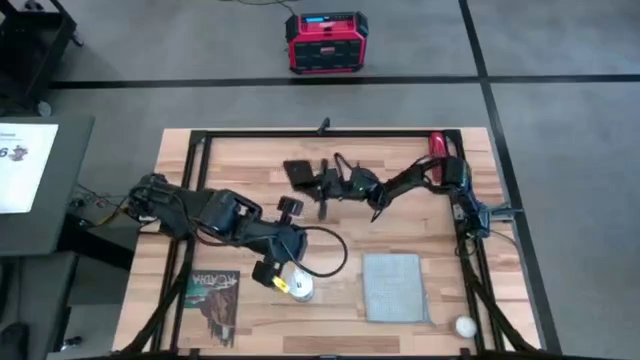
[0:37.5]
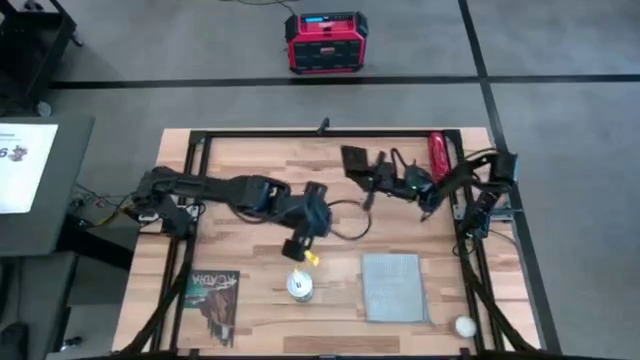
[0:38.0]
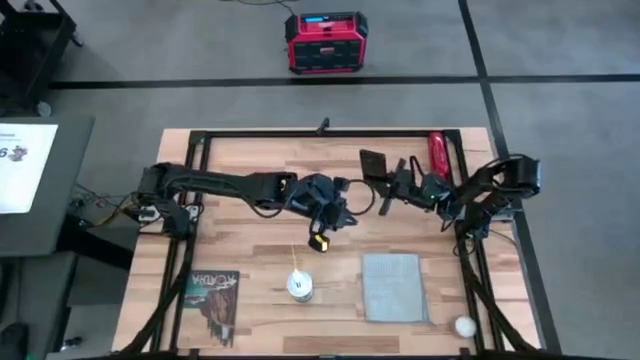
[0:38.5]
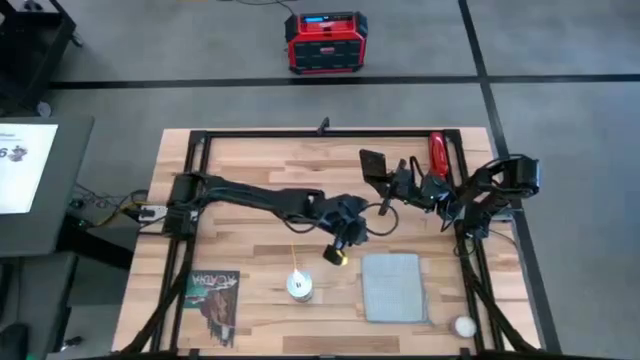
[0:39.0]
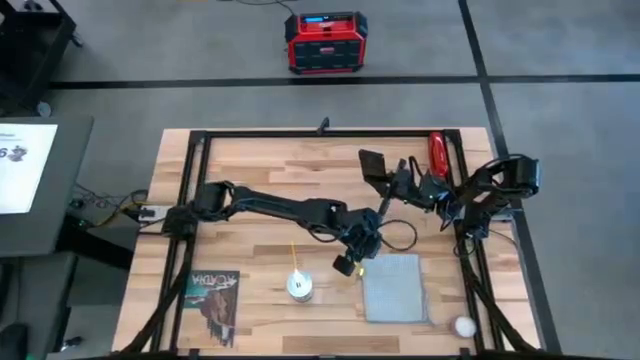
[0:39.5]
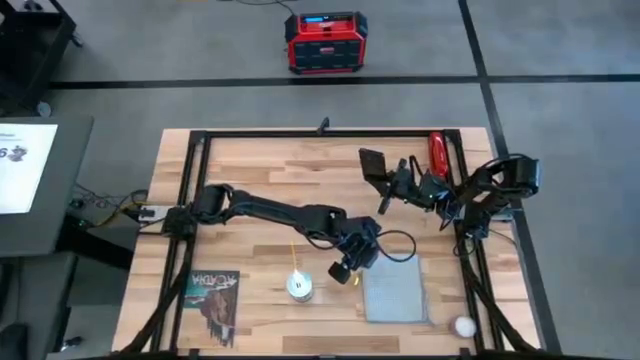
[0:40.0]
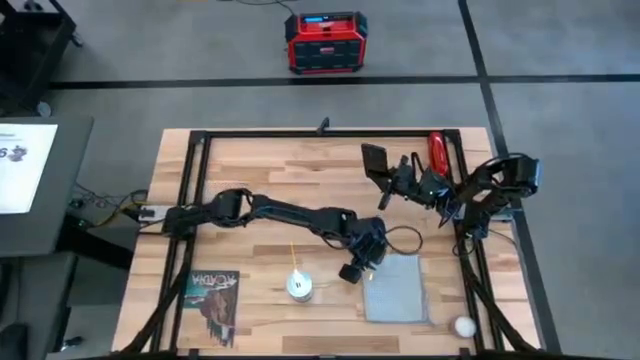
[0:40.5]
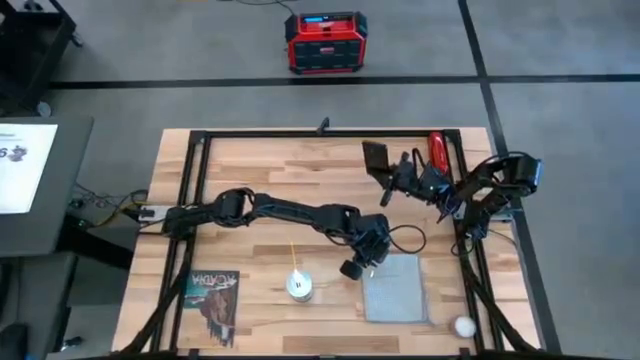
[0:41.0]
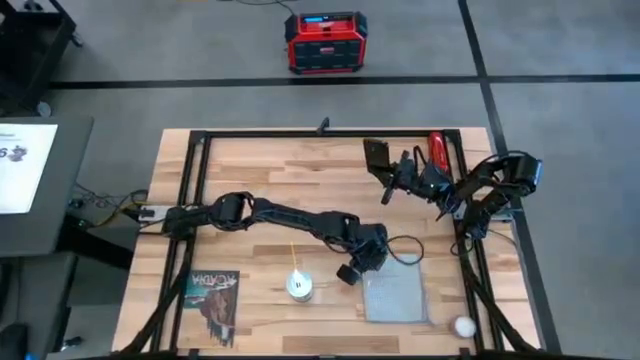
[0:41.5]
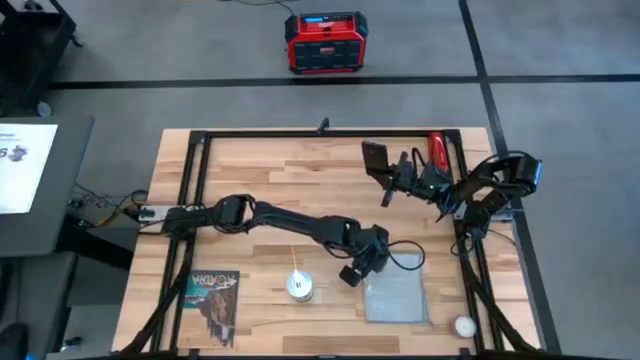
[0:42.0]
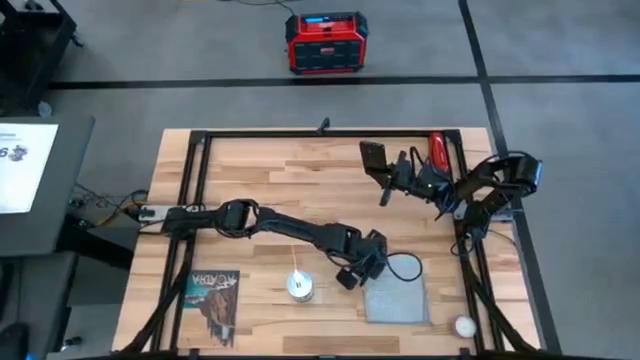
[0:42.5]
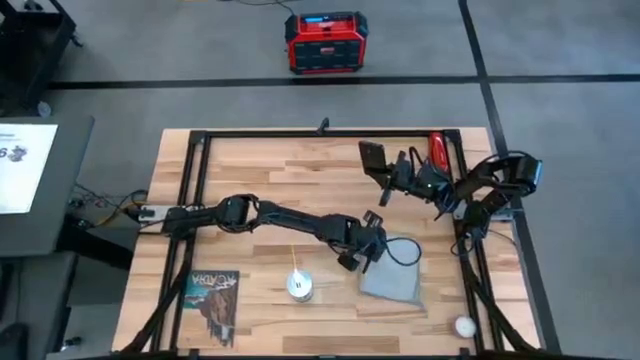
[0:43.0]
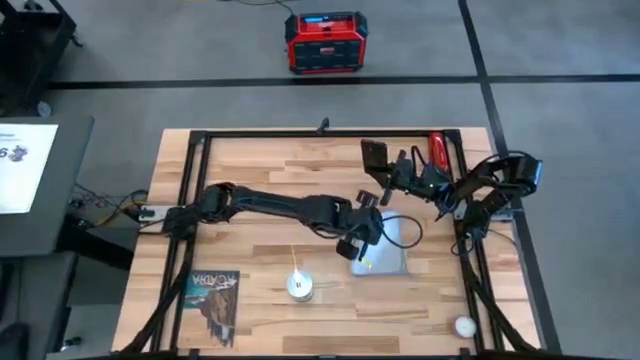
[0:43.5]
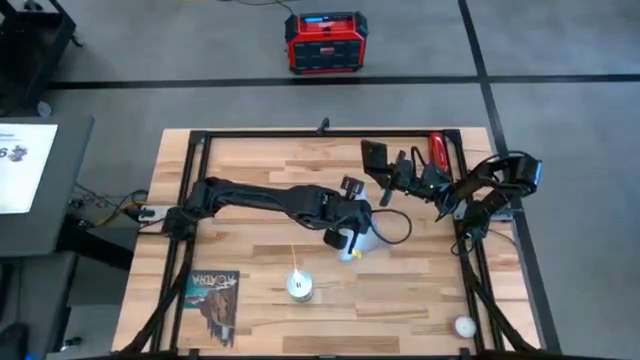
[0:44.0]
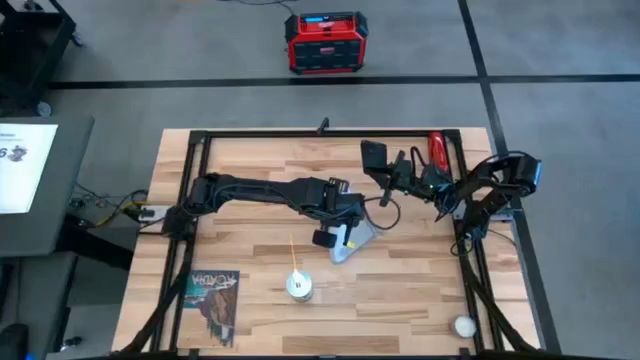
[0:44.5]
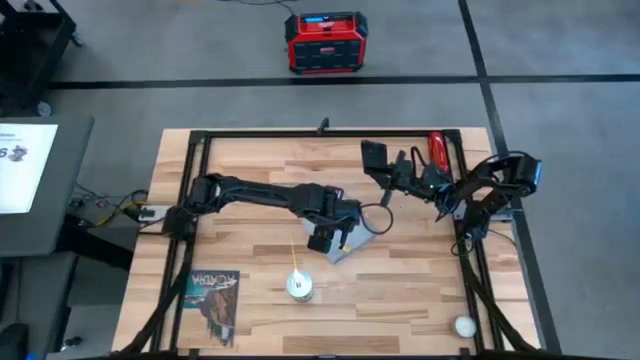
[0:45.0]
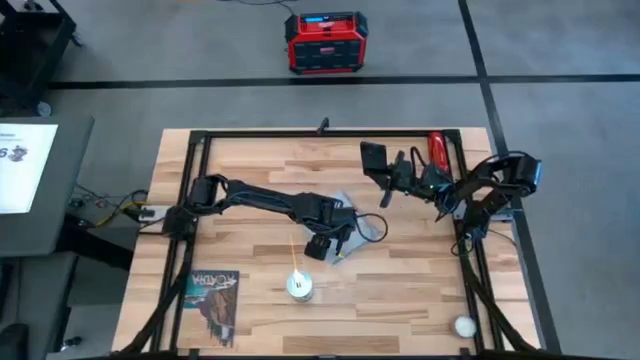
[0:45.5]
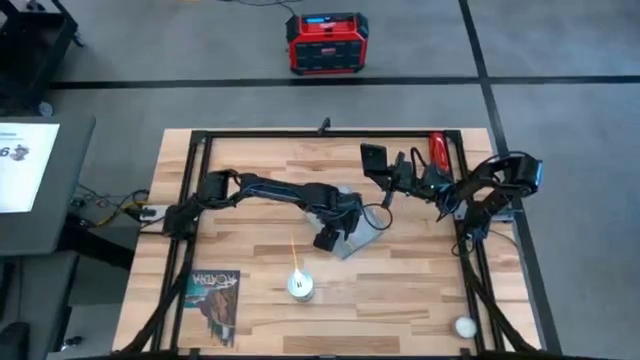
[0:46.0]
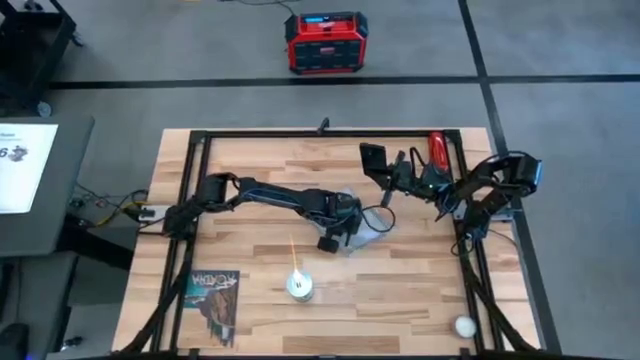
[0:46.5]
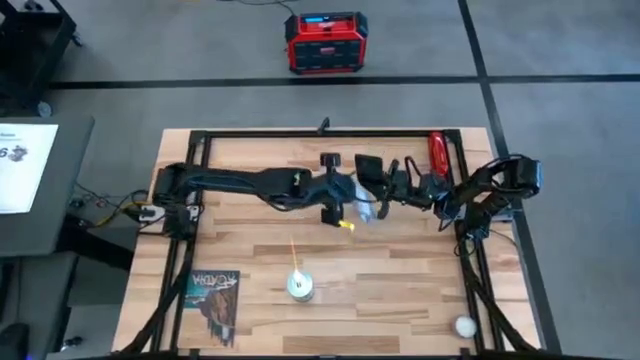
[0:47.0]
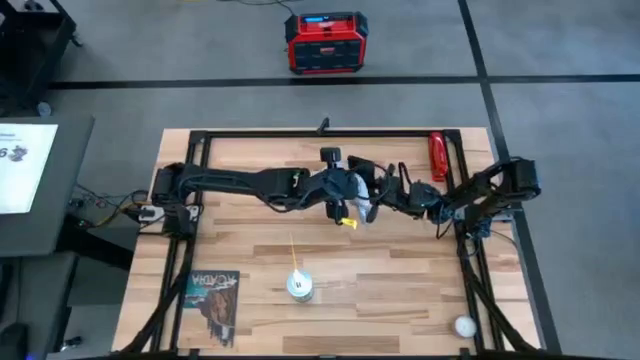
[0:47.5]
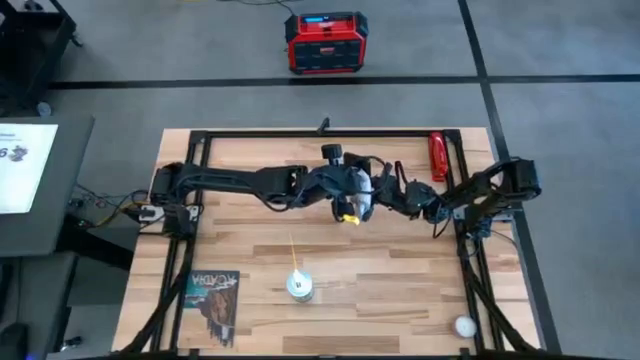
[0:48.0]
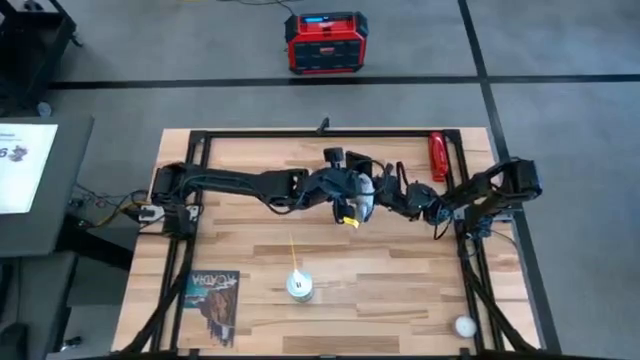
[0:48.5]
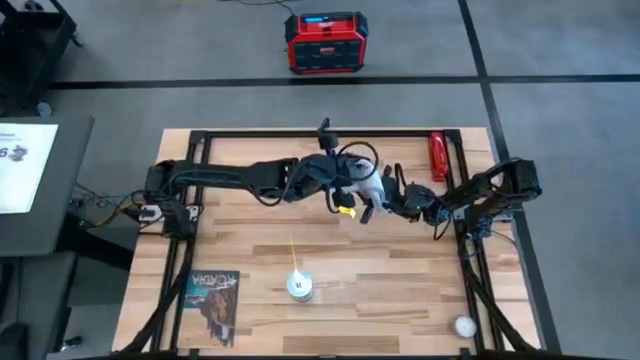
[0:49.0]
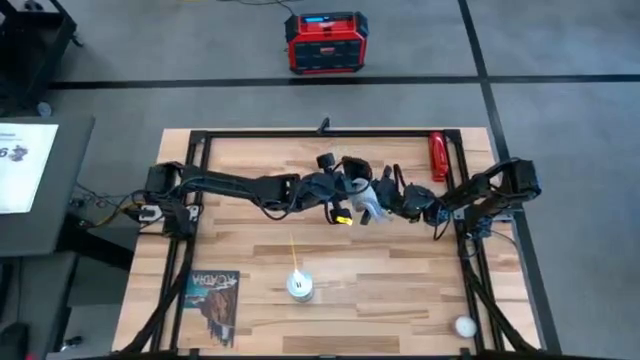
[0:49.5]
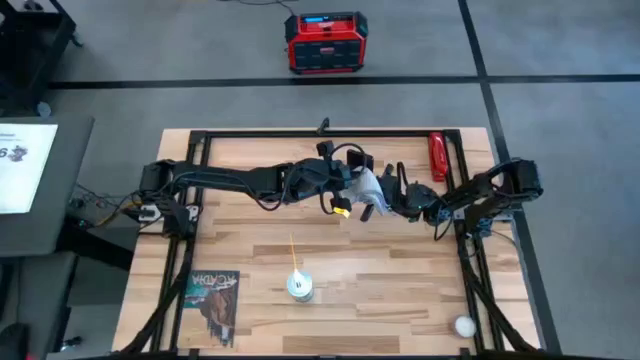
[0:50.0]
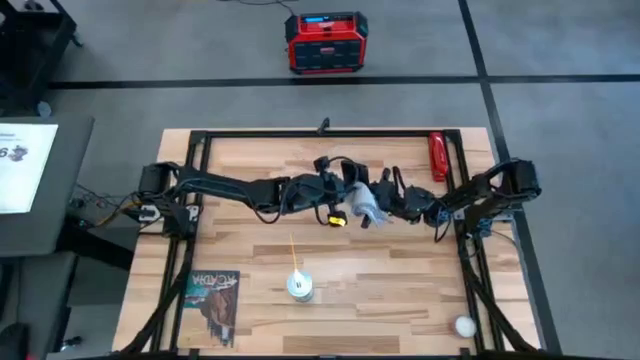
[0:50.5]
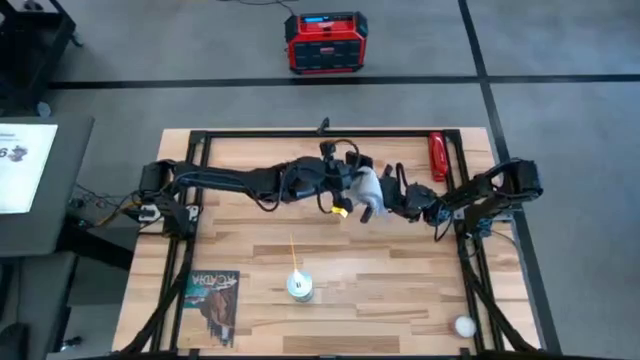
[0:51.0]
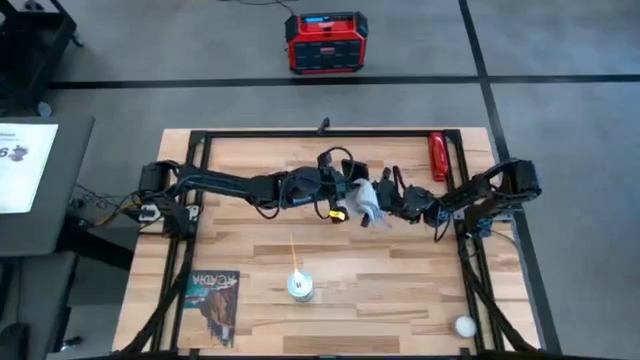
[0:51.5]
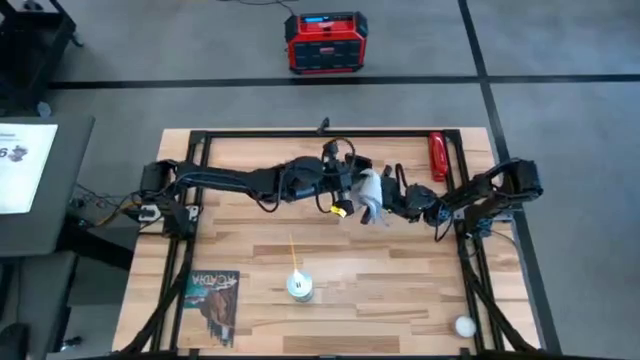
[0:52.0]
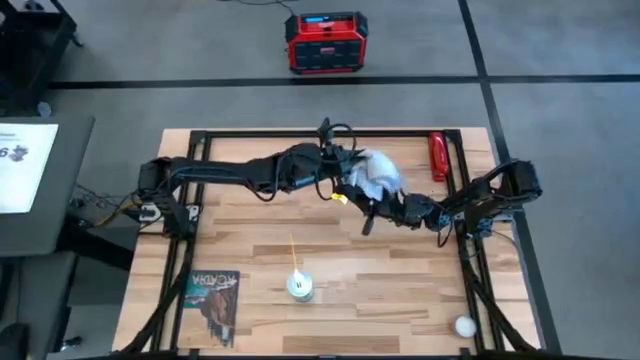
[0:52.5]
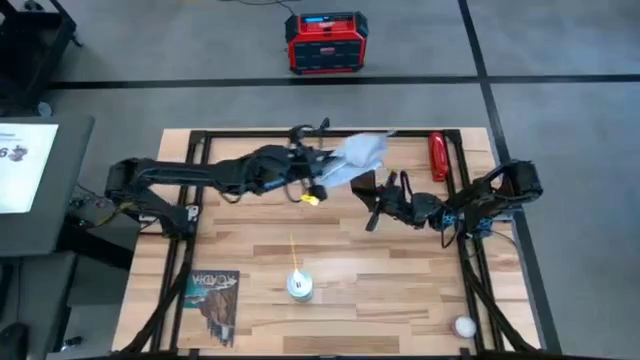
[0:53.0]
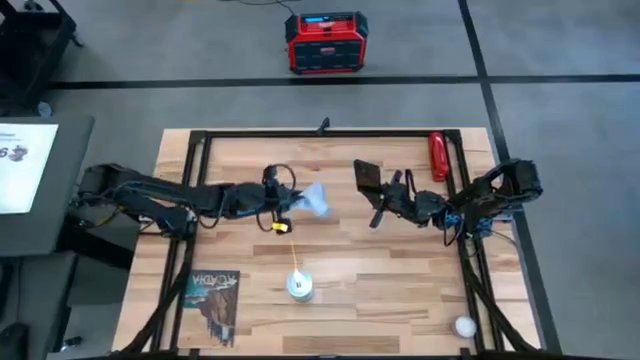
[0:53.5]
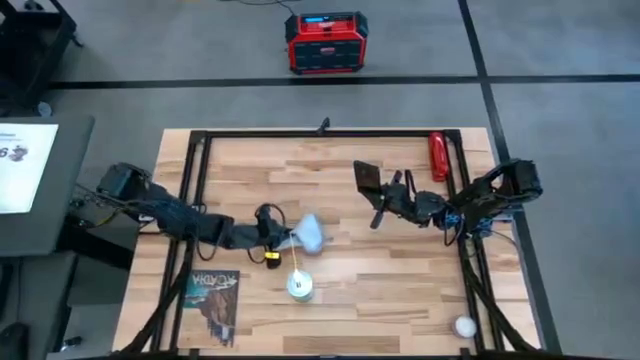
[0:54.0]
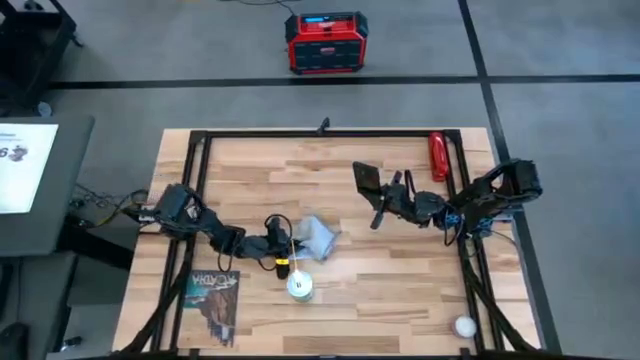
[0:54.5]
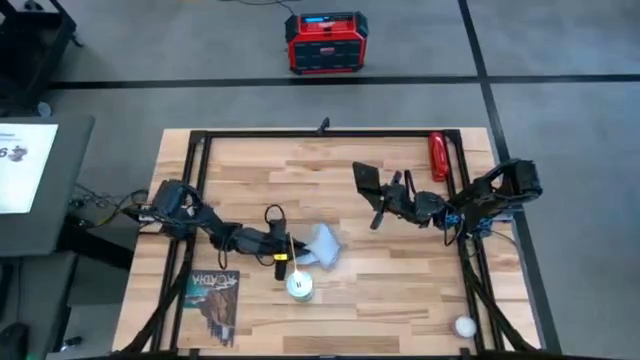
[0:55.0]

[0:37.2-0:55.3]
Task: Apply microfiber cloth
Wipe the back of the cellphone with the microfiber cloth

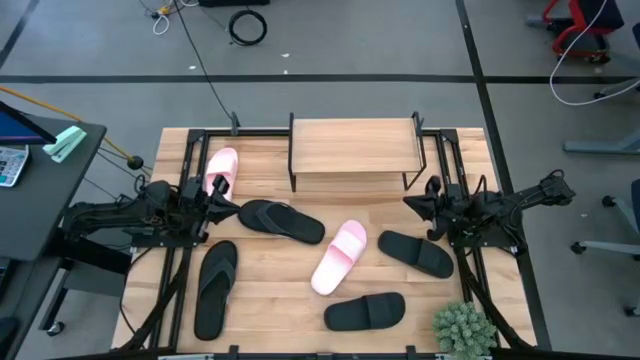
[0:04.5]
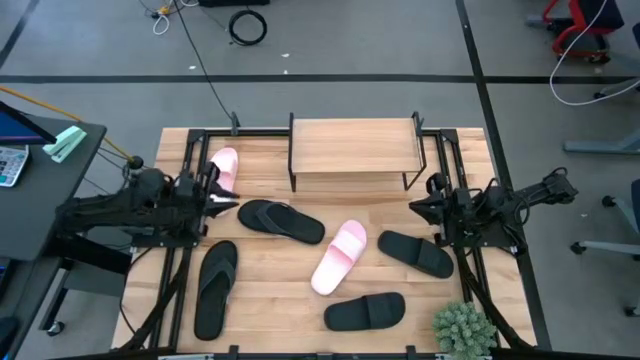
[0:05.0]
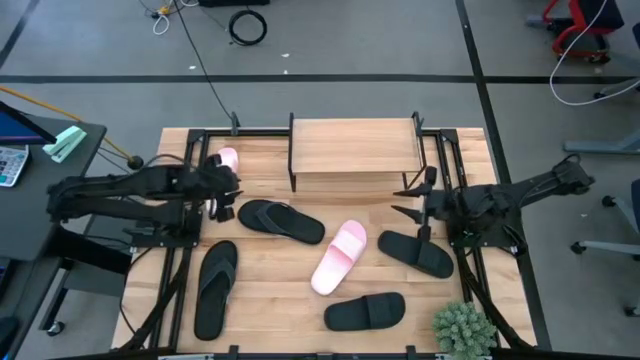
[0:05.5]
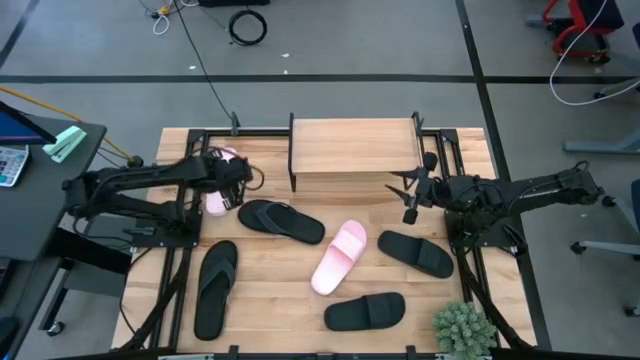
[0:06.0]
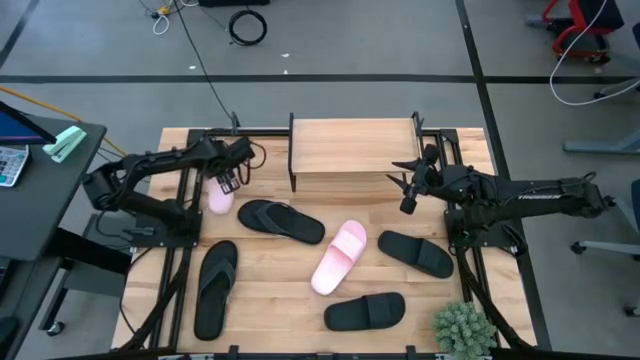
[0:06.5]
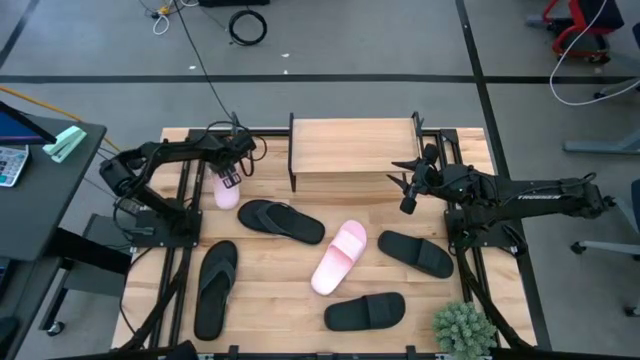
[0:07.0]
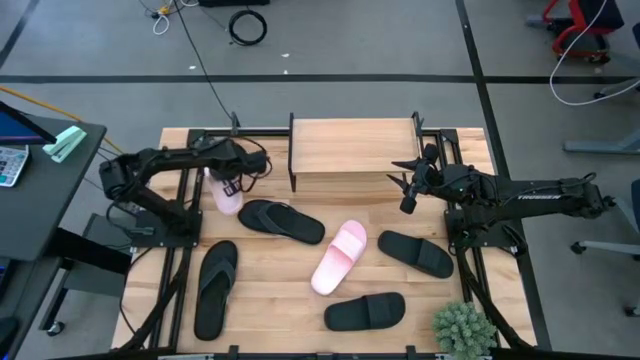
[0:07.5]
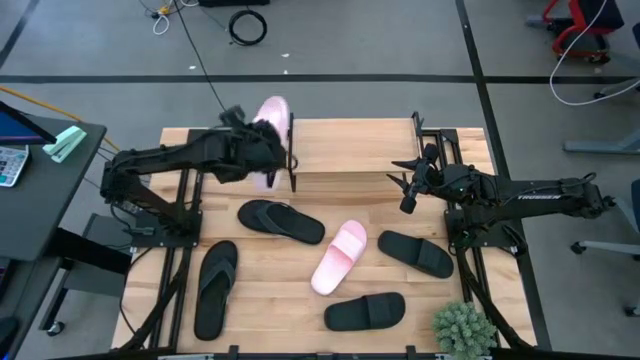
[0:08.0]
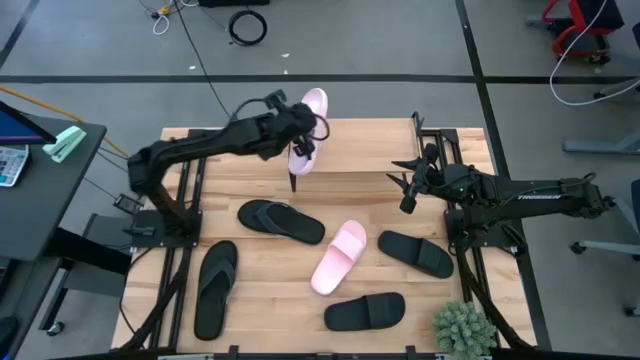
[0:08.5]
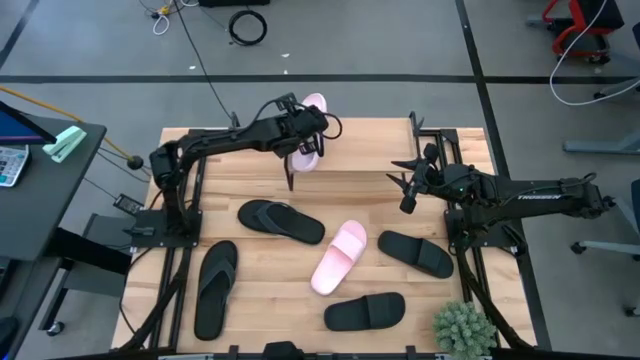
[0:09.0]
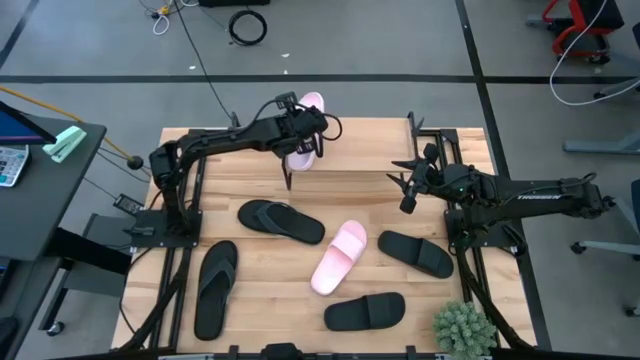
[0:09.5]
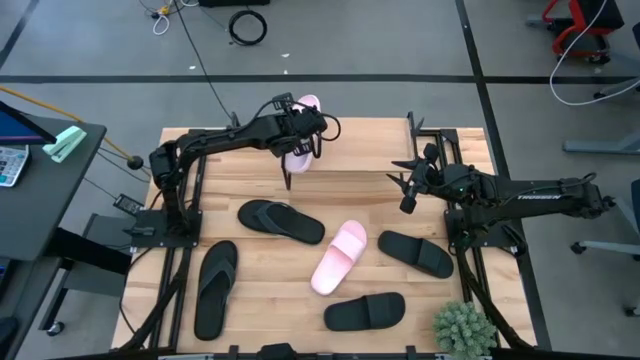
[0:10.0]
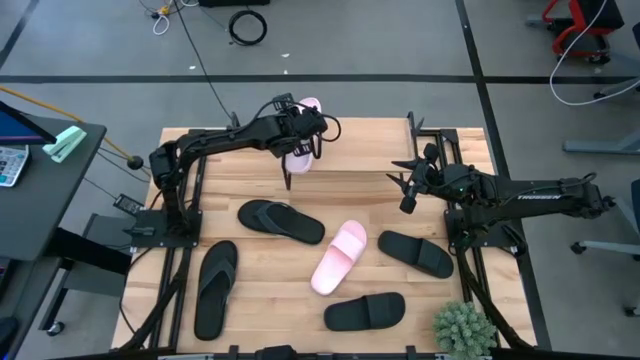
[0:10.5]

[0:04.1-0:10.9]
Task: Pick and place slides into the shelf
Put the left pink slide on the shelf
